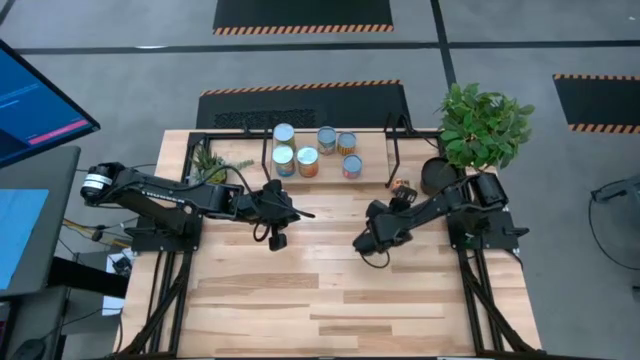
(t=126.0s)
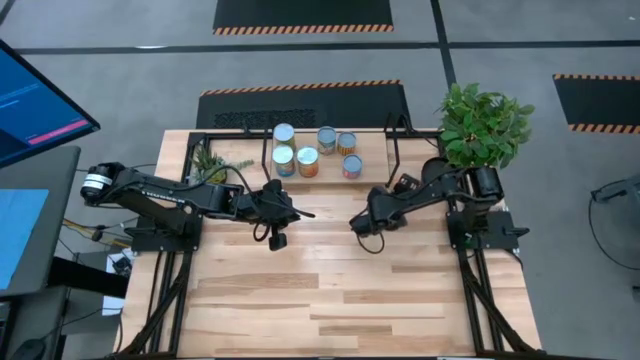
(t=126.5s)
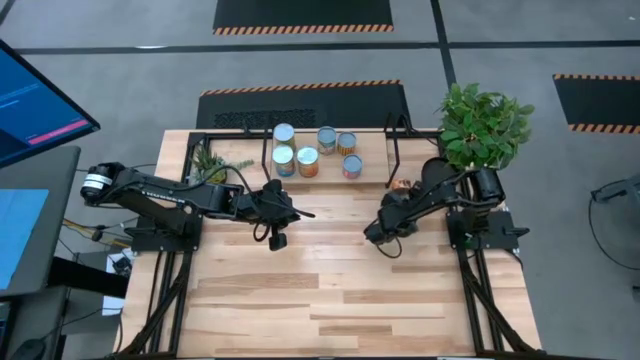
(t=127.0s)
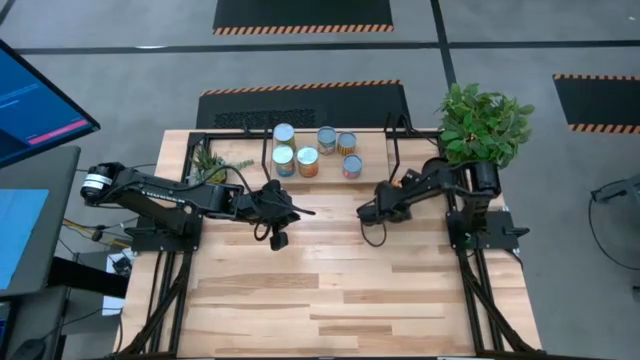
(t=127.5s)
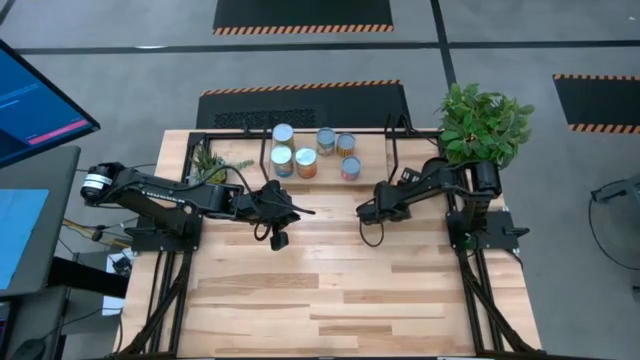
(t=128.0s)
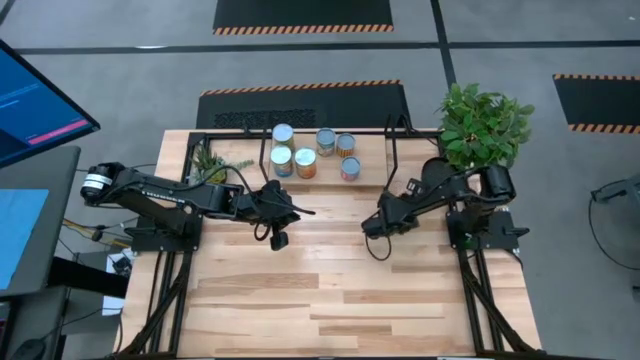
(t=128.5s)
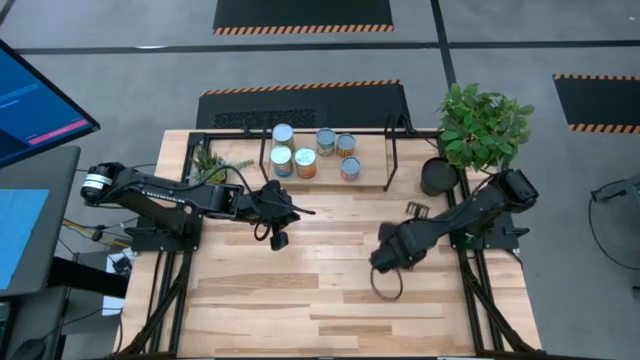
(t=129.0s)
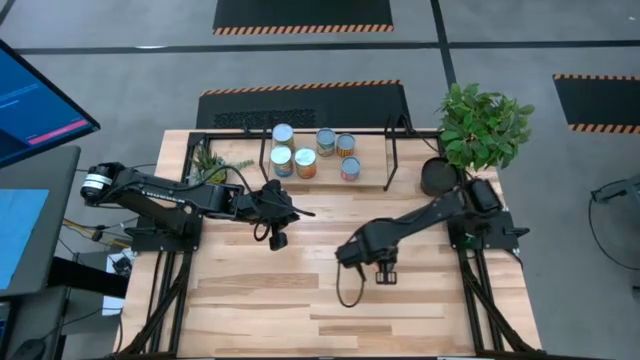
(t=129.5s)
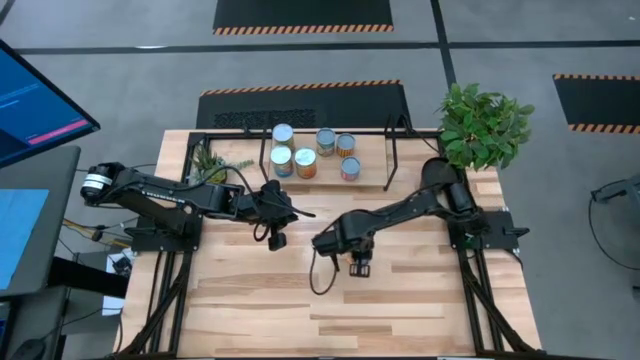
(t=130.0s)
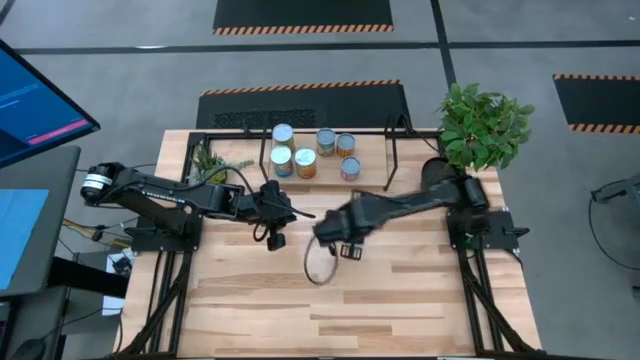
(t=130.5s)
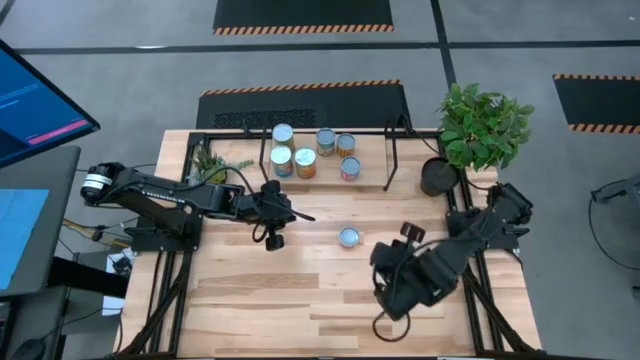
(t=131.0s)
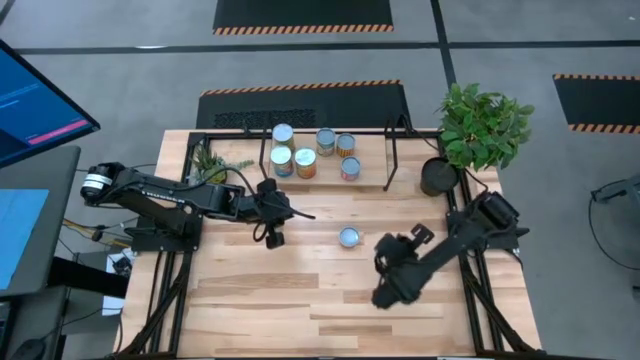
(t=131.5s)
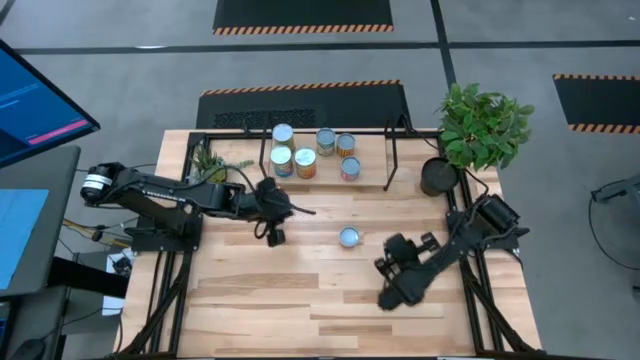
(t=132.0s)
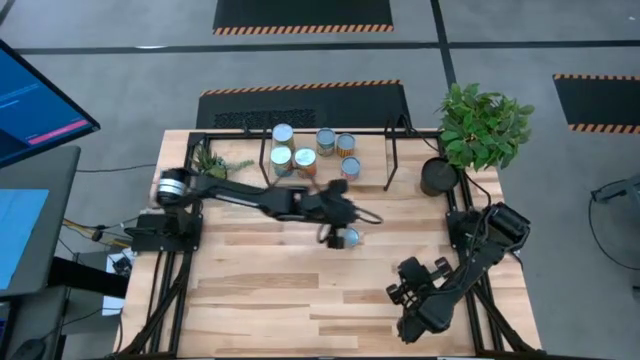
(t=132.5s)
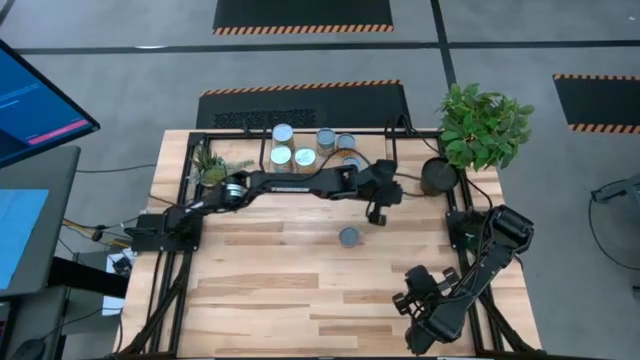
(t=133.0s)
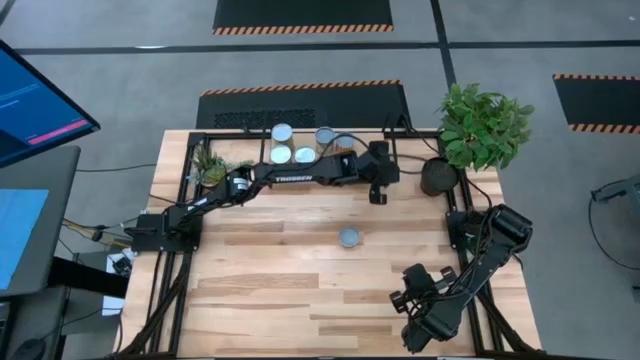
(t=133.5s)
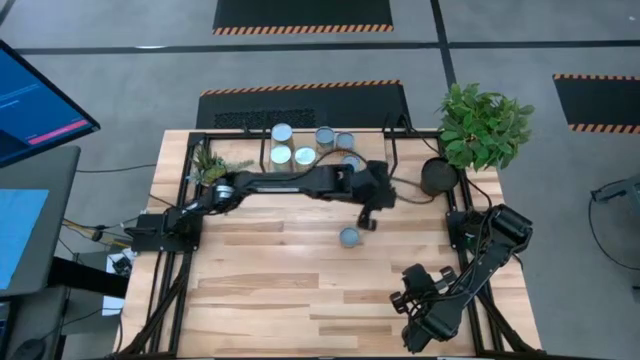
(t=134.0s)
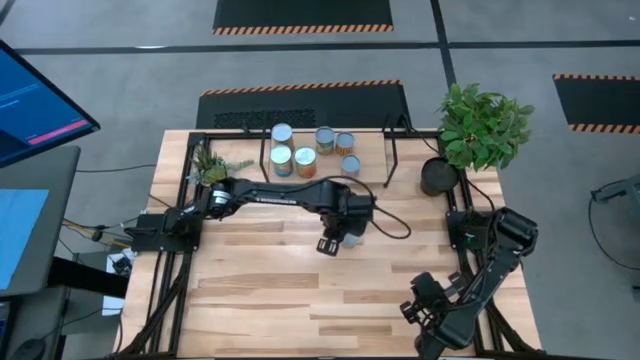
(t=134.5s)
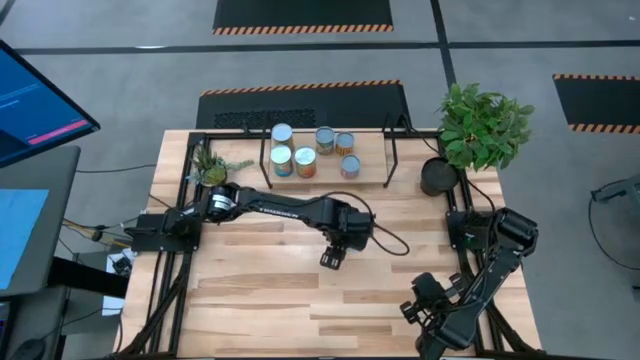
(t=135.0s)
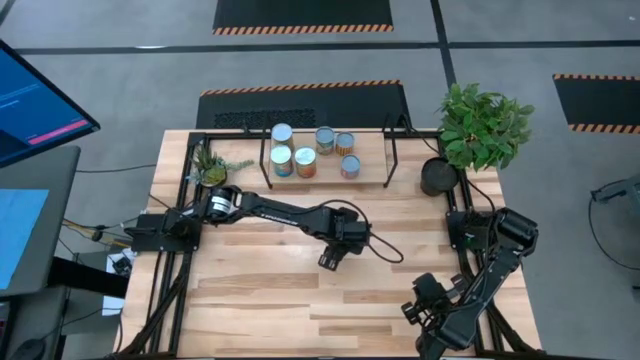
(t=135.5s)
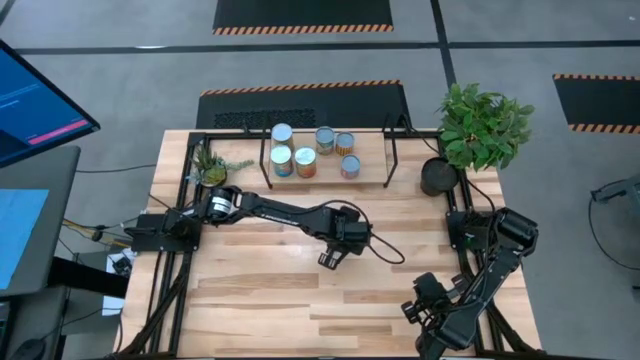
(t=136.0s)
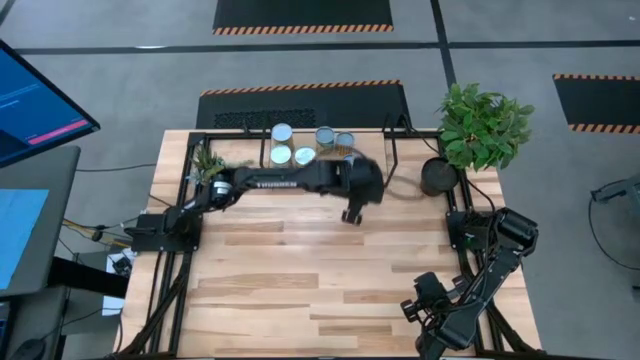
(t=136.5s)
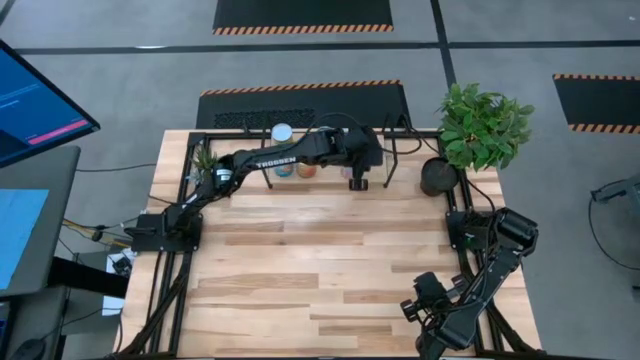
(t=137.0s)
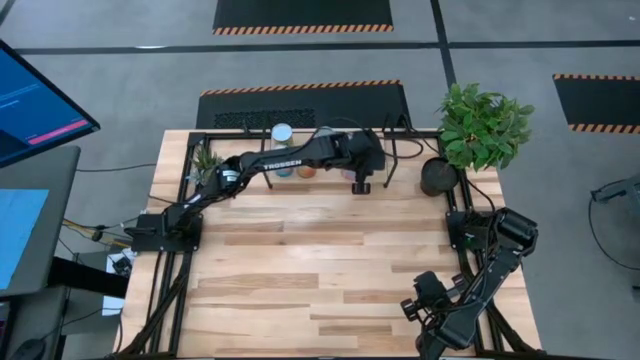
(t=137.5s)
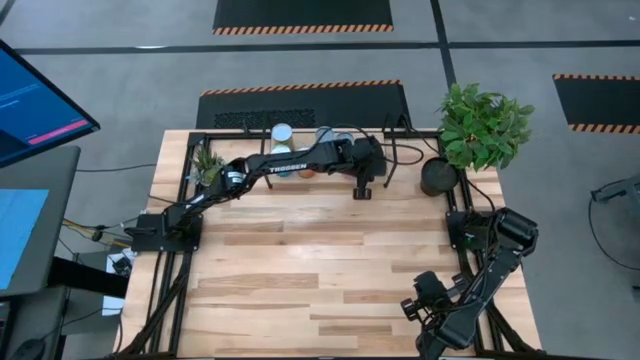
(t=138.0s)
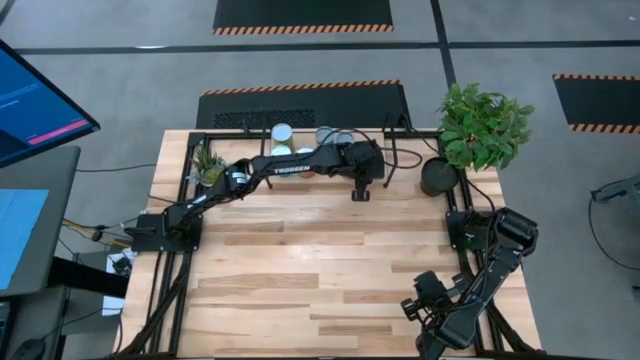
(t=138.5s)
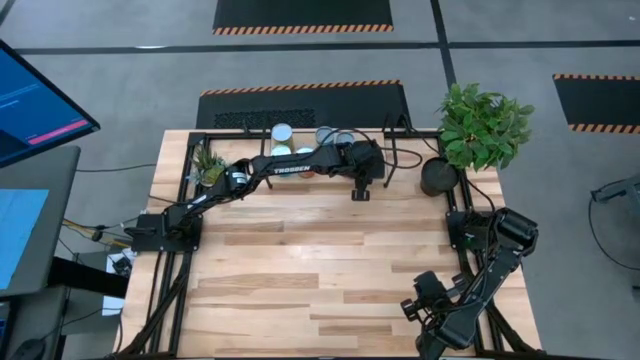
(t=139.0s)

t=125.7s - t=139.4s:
Task: Pick and place cans onto a shelf
Put the canned pineapple on the shelf

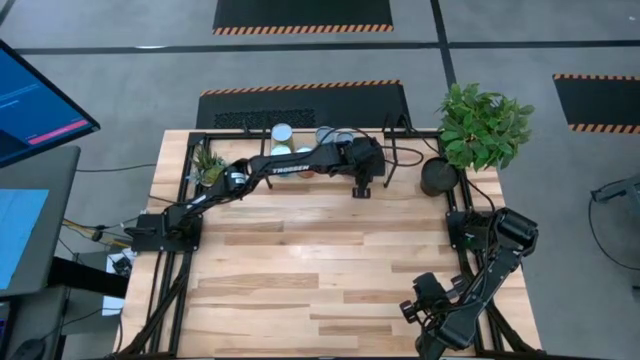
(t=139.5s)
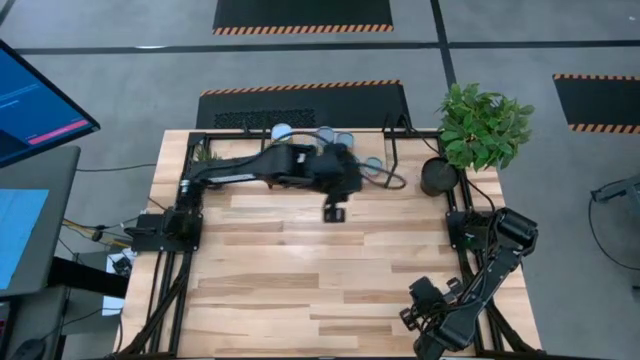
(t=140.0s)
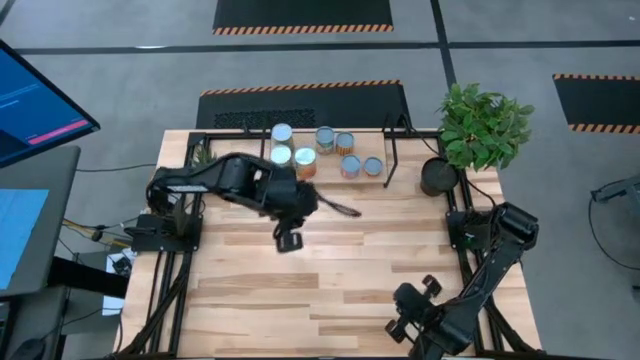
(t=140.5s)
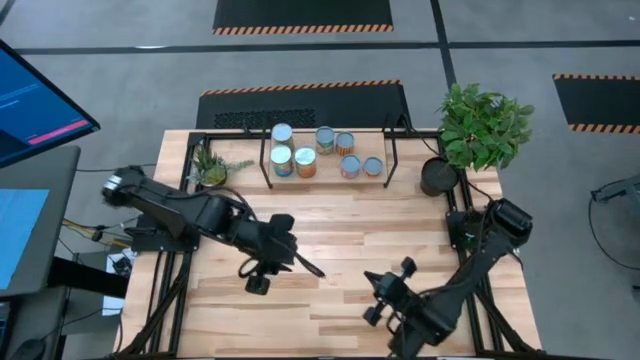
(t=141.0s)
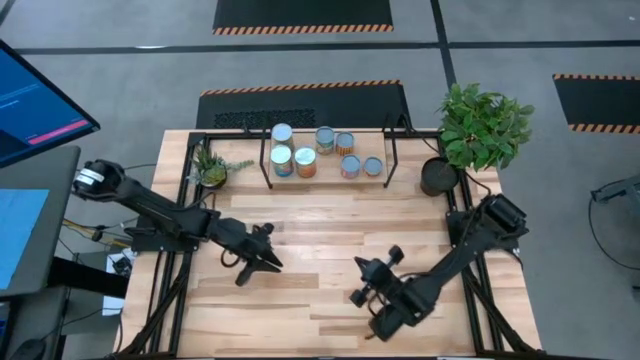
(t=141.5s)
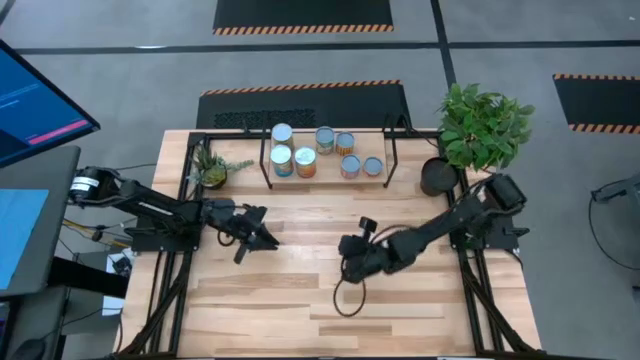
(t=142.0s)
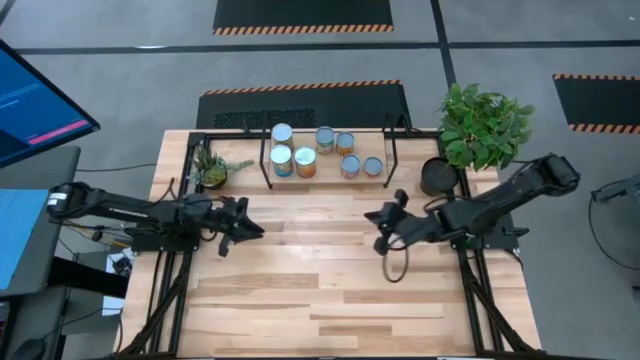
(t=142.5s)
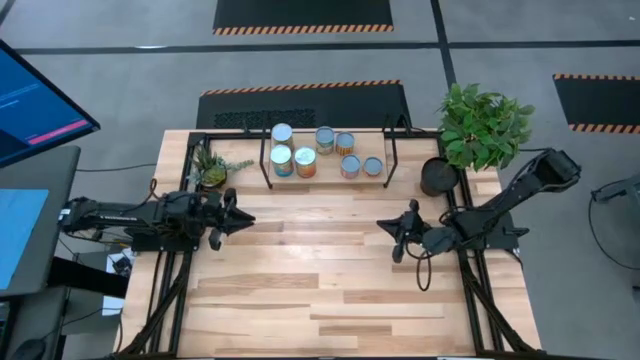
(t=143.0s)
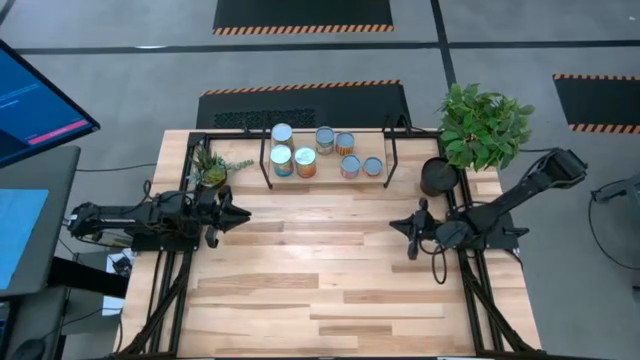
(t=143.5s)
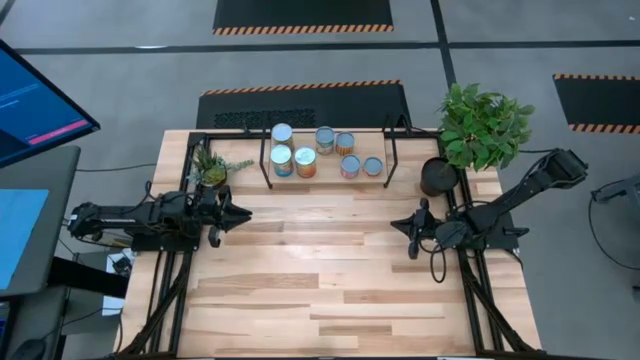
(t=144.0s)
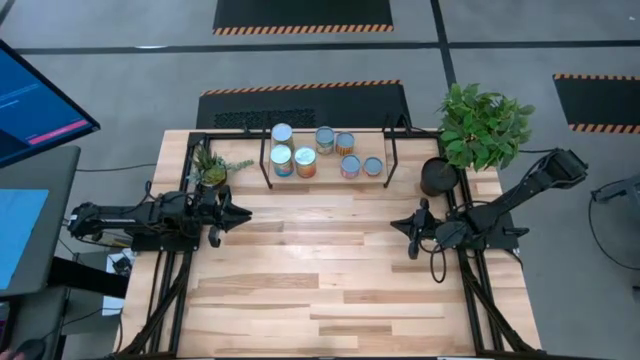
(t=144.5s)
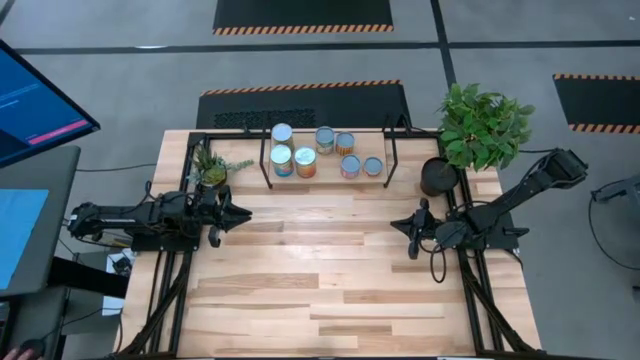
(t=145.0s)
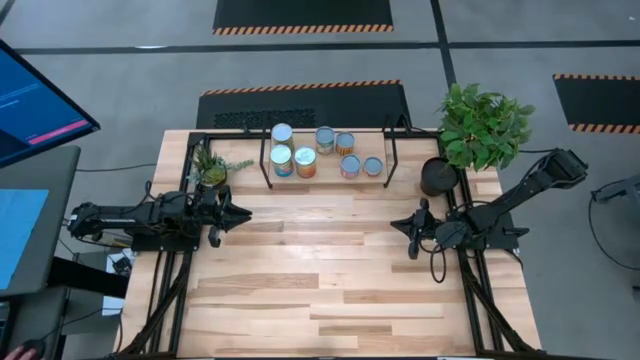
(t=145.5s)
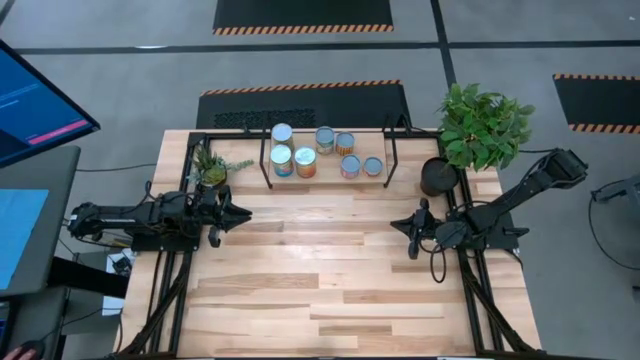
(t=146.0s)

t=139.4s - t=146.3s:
Return to Home Position

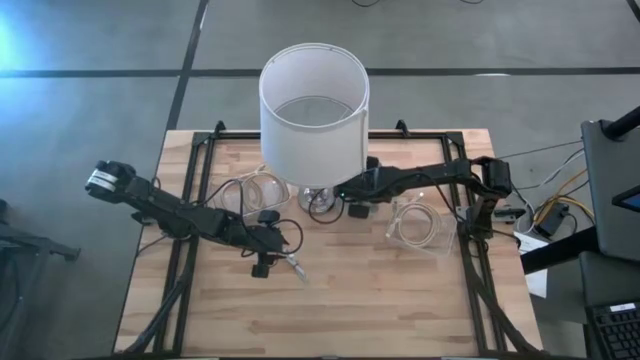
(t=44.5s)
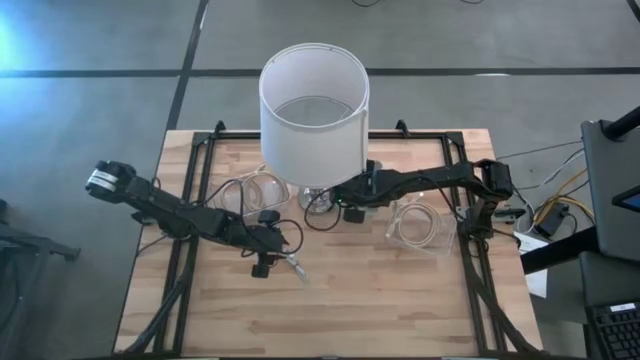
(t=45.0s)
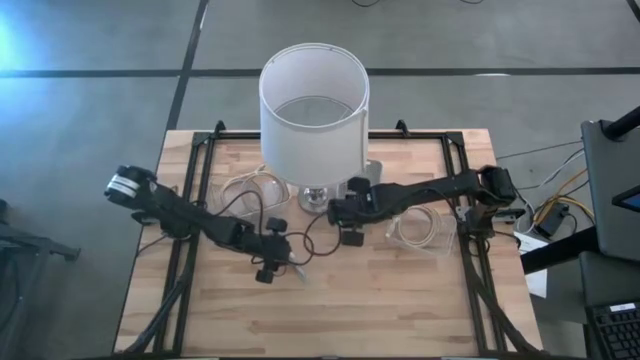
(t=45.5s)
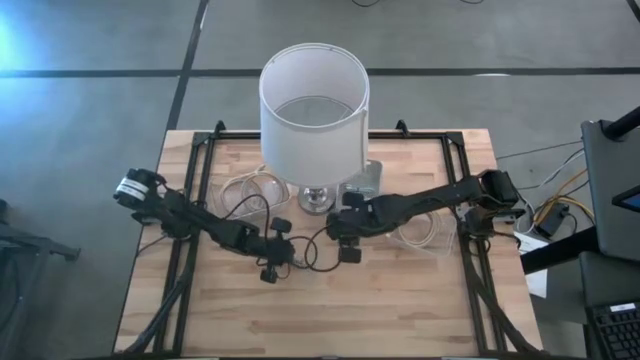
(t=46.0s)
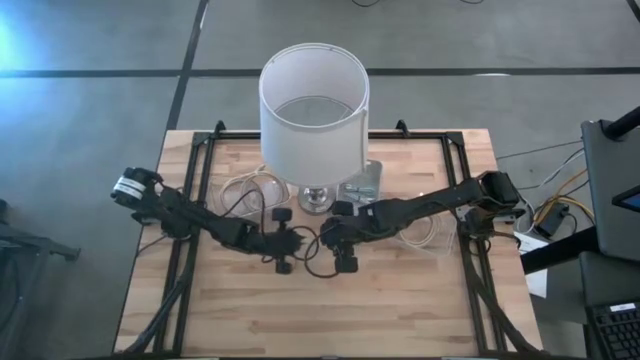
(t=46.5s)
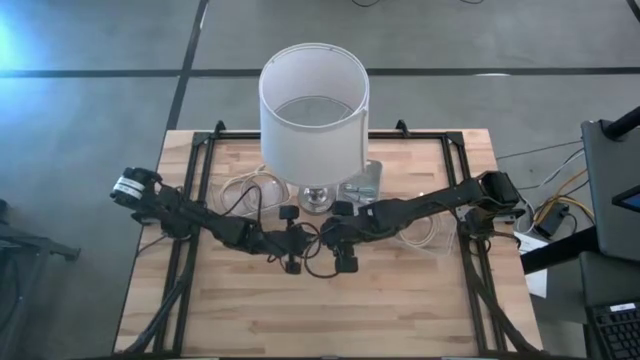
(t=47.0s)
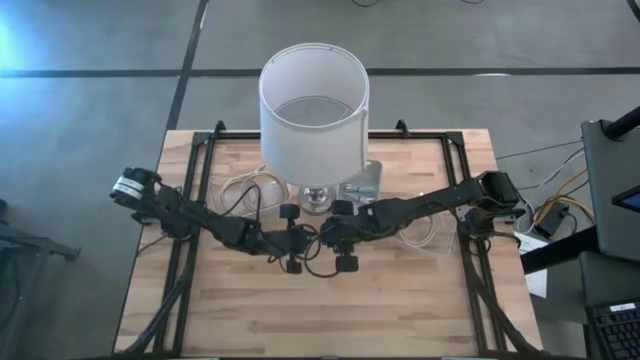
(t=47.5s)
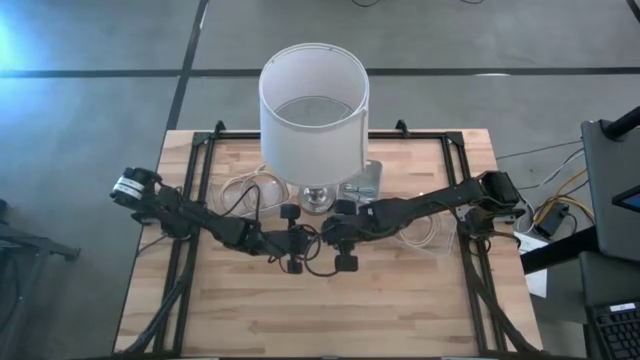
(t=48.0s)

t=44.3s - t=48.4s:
Task: Pick & Place USB Port
Put the blue charger cable into the gray bin
